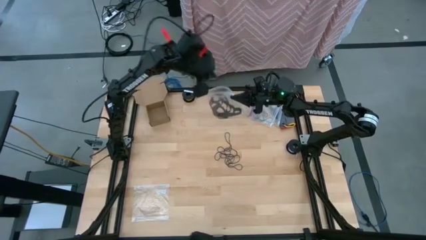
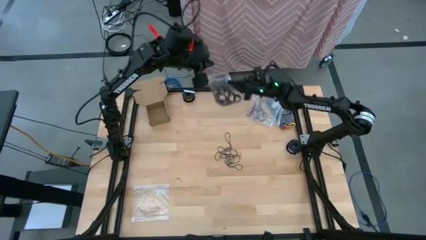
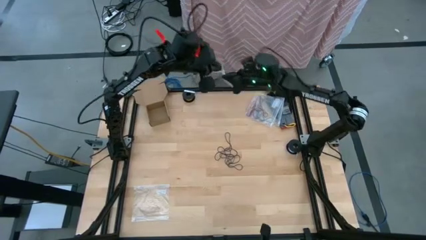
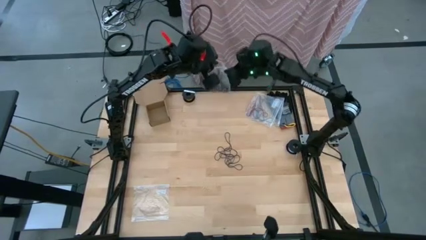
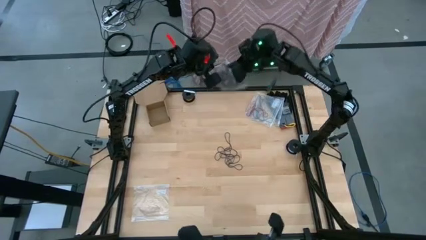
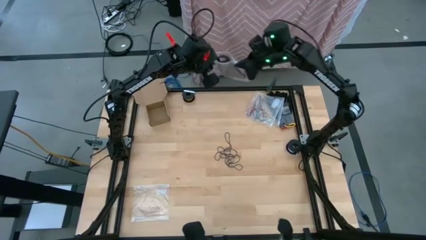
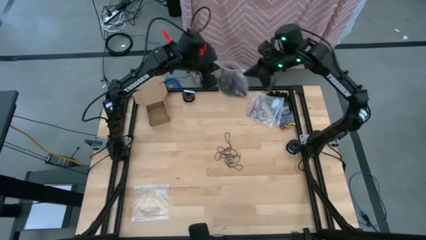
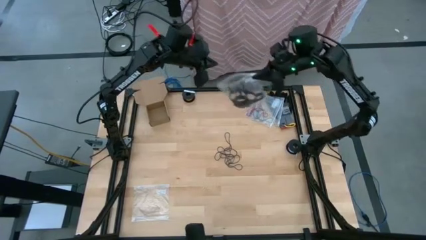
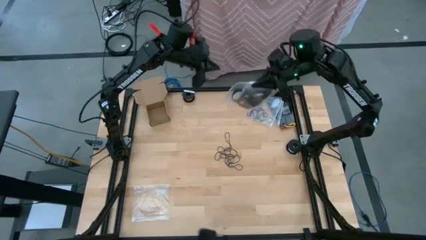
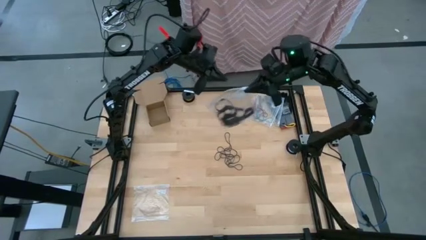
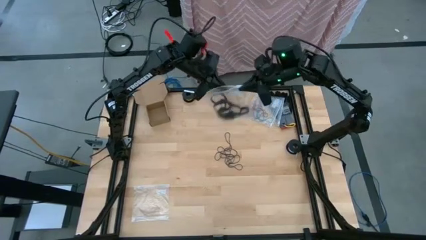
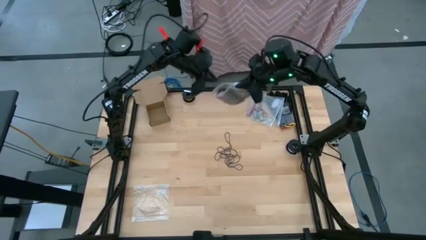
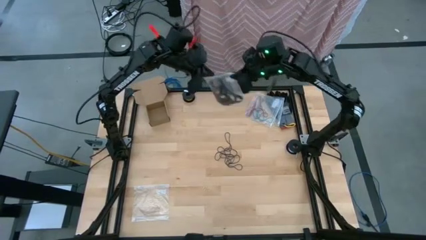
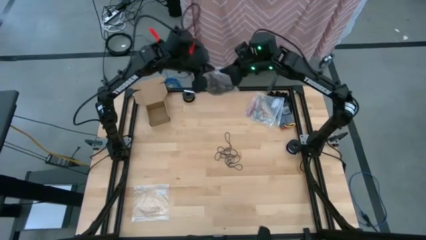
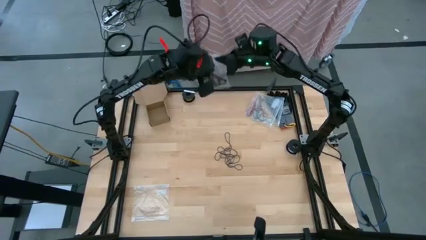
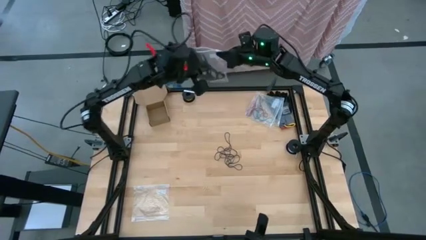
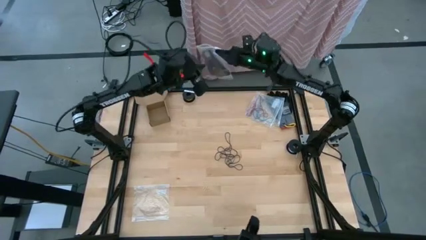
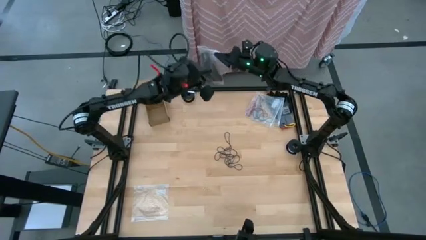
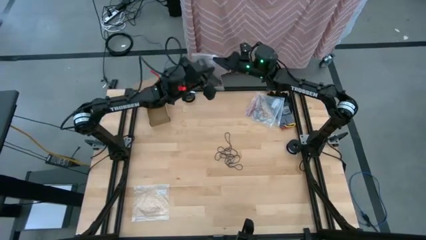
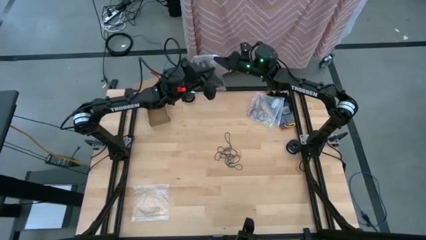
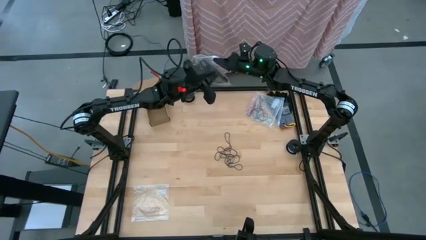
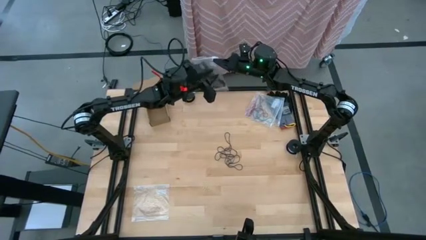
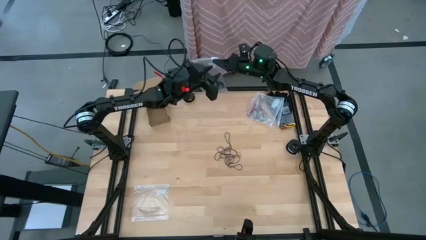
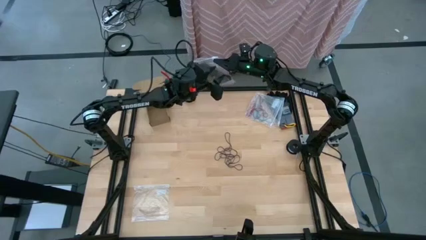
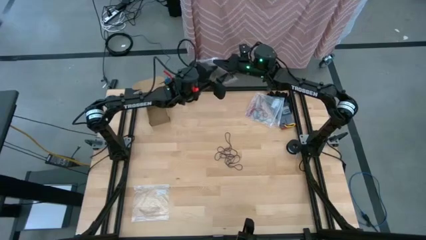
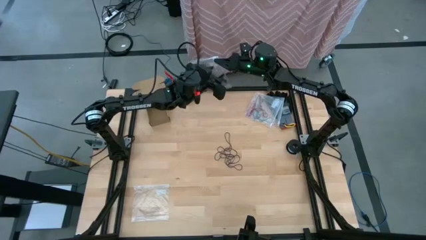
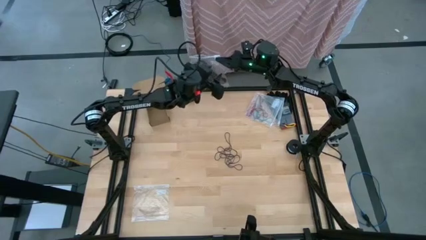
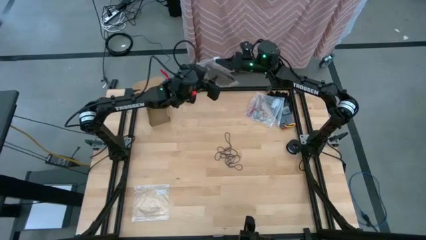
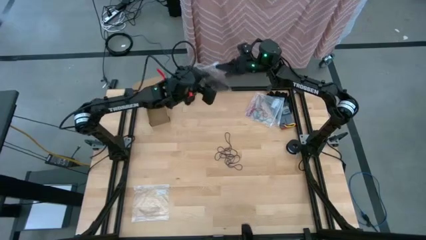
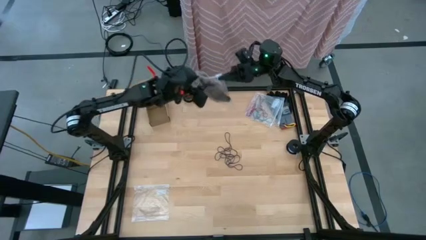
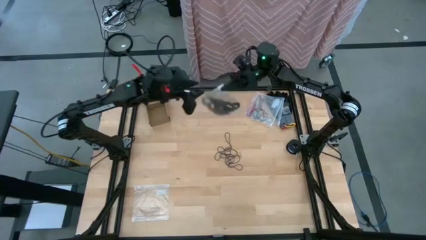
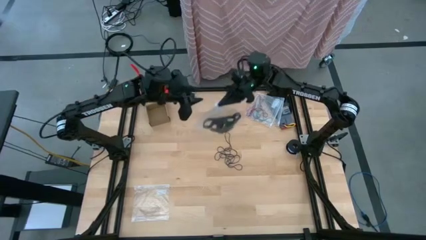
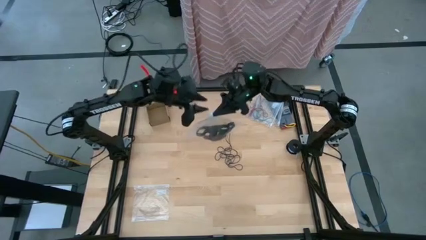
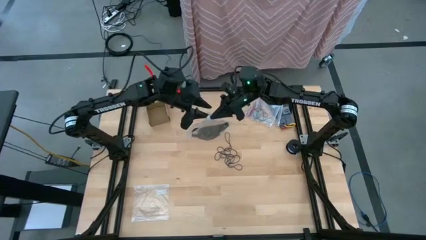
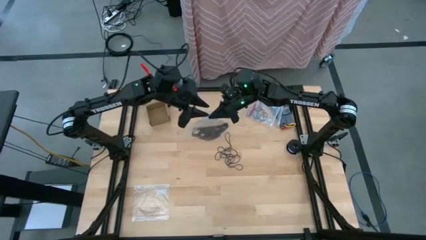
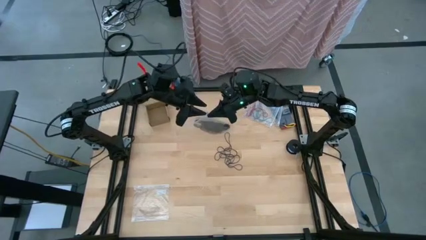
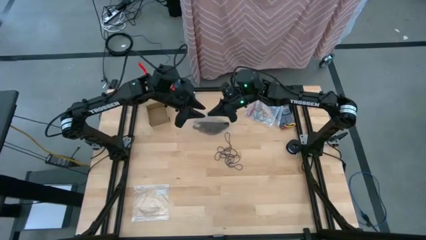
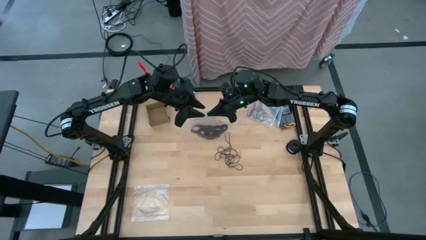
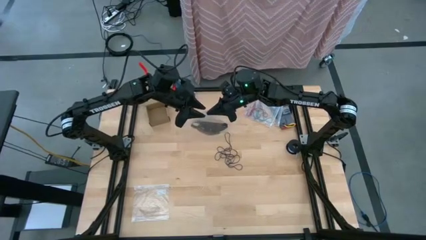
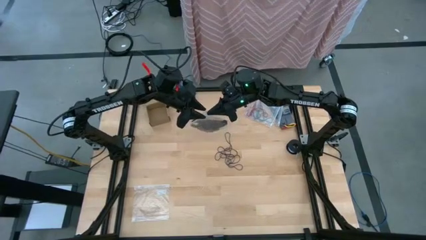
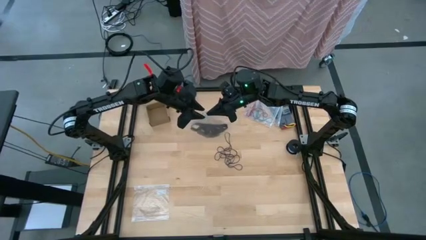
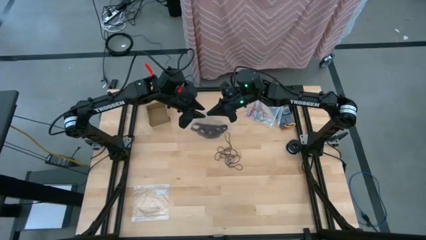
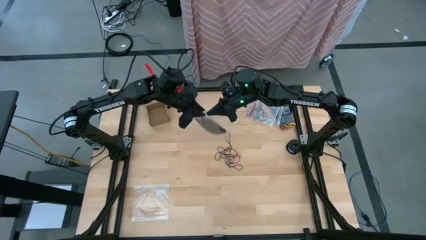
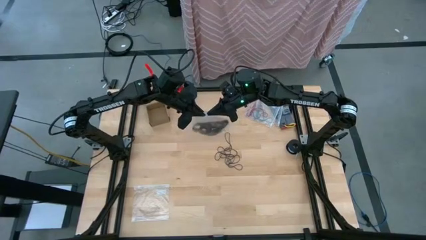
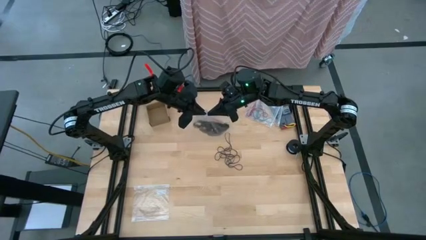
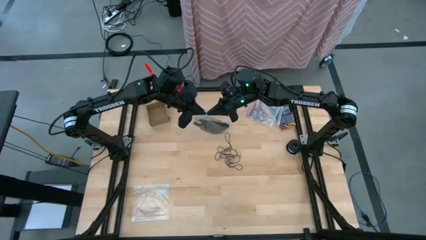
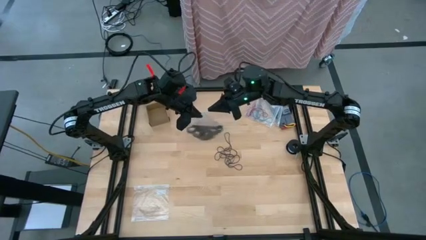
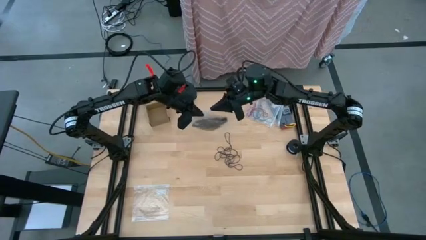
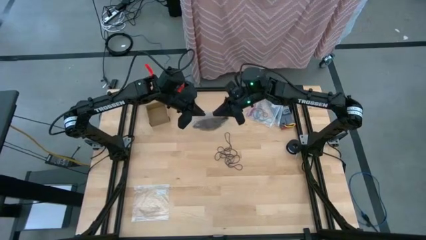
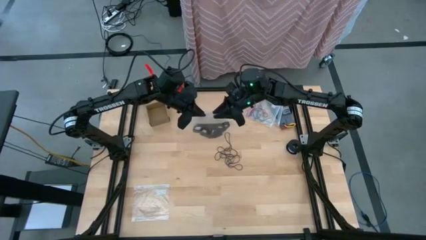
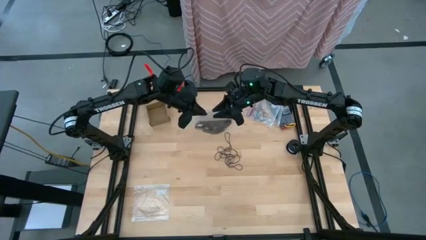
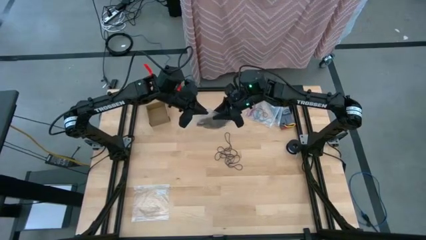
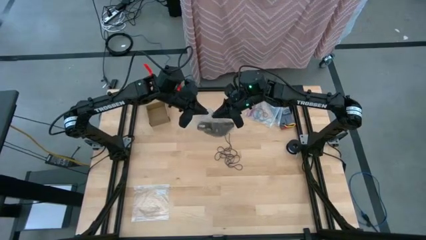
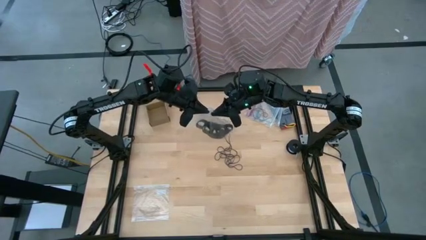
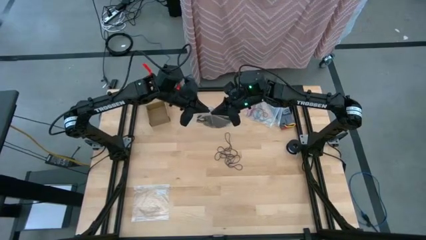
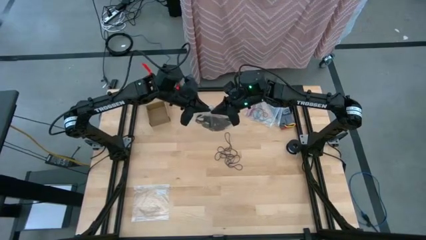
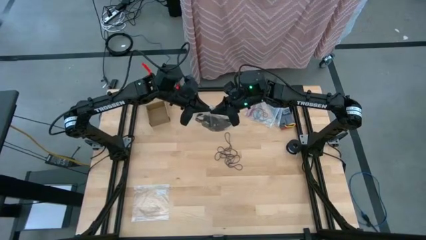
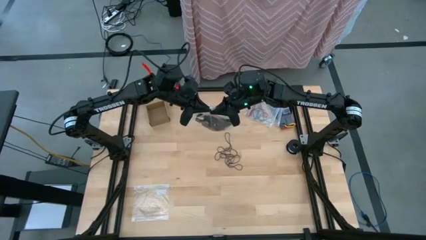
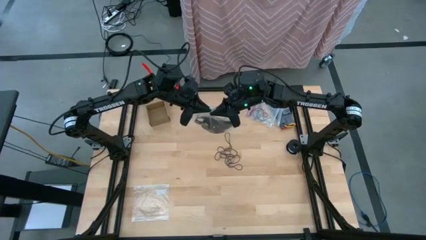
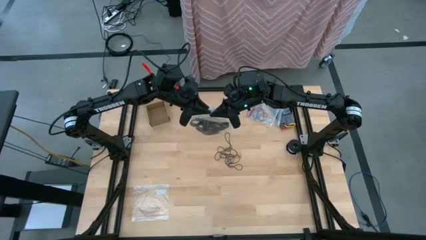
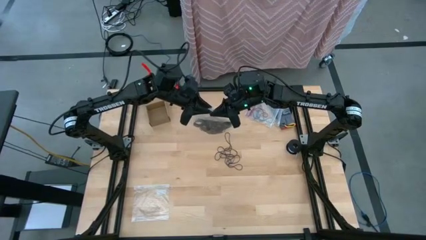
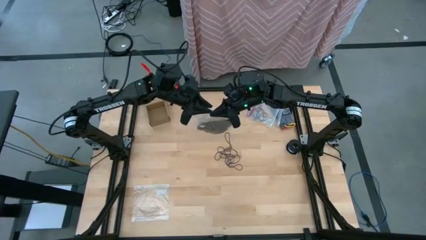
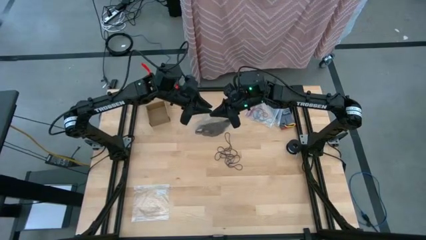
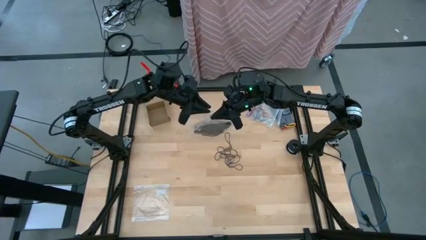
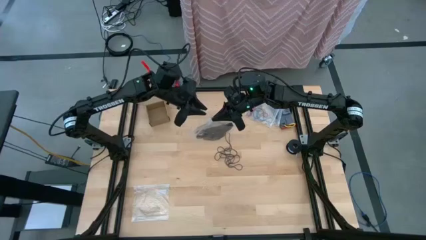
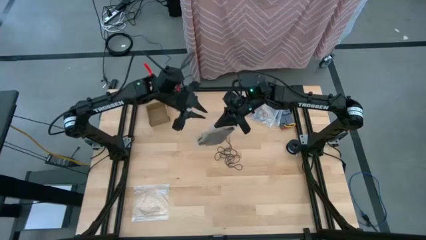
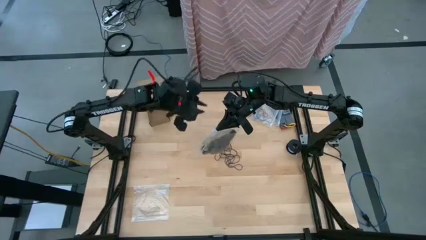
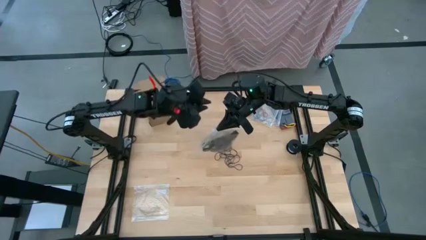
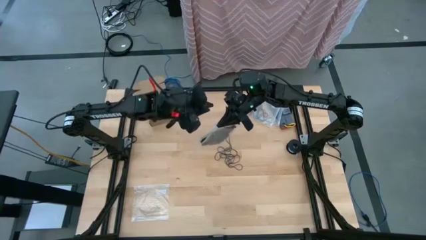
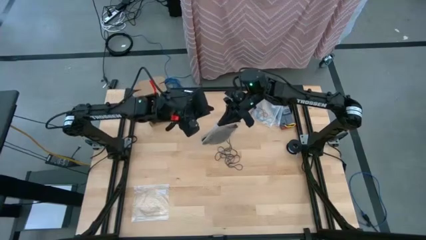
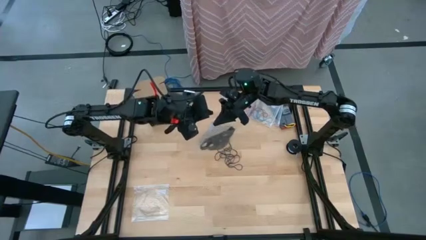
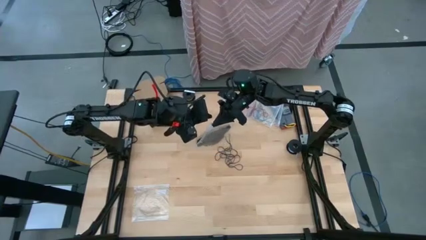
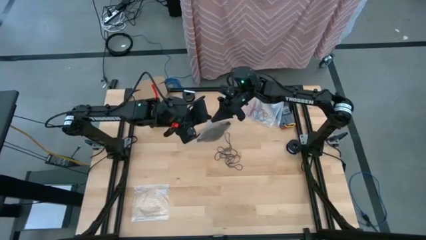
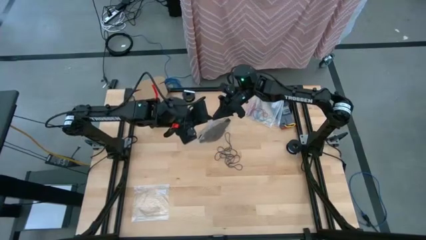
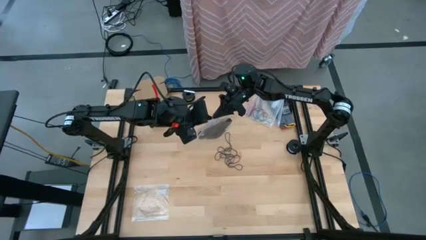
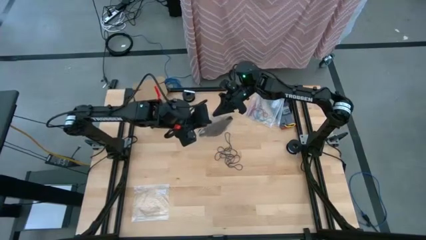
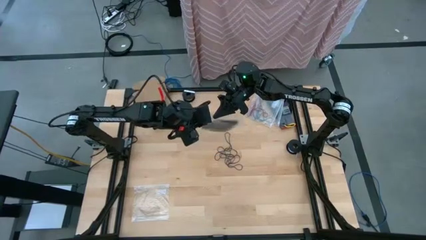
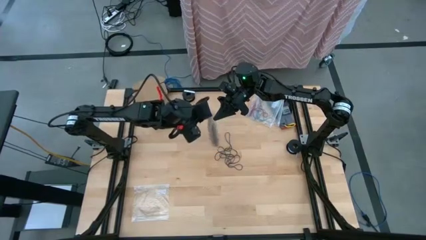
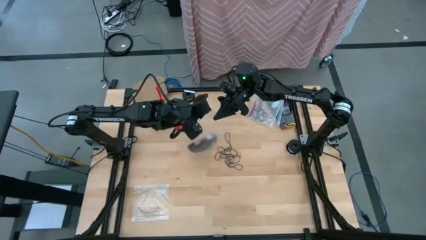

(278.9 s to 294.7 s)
Task: Sort rubber bands
Close the transparent zip bag

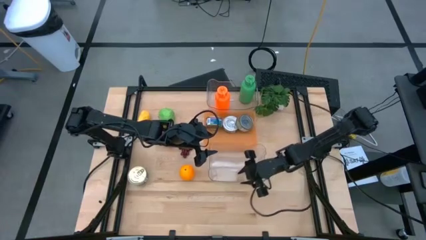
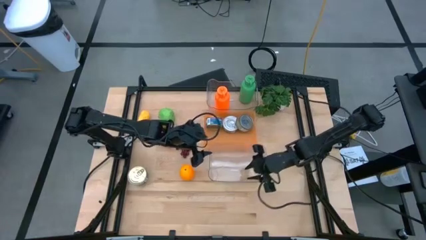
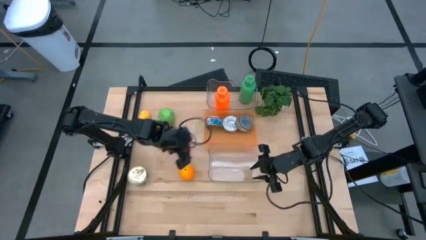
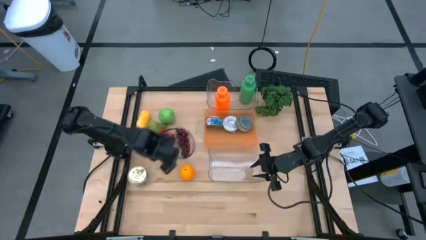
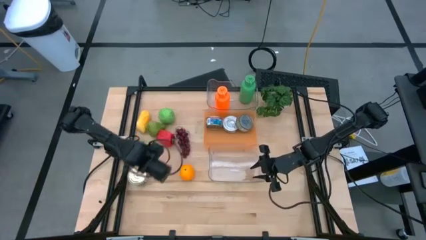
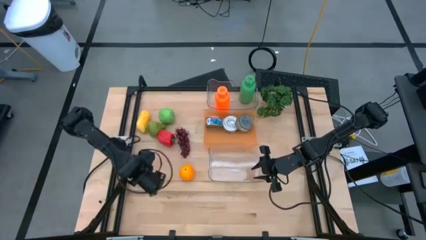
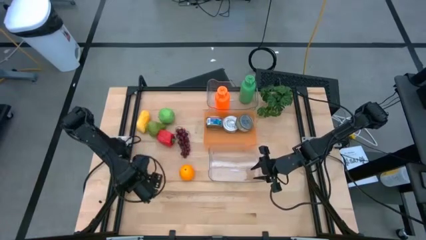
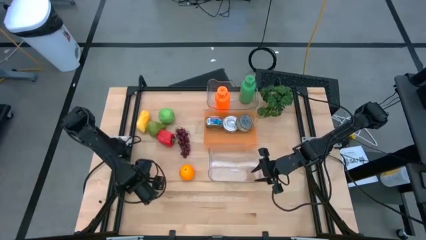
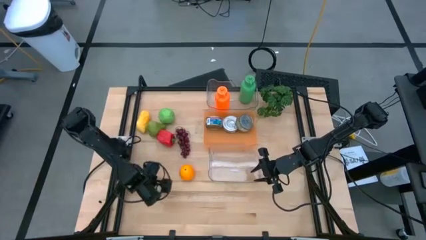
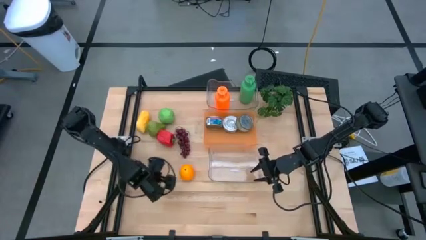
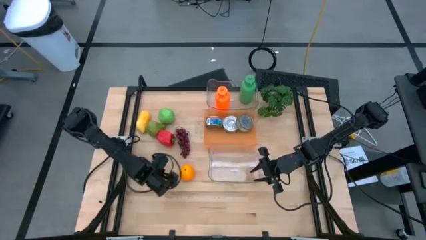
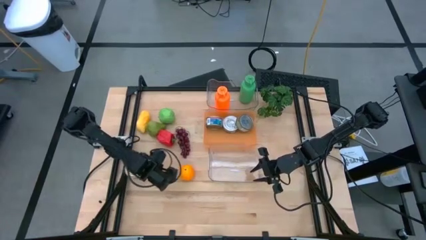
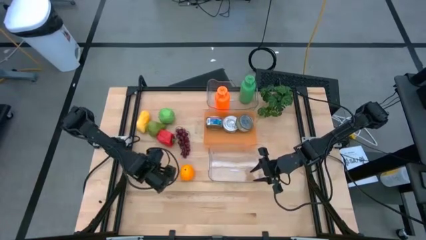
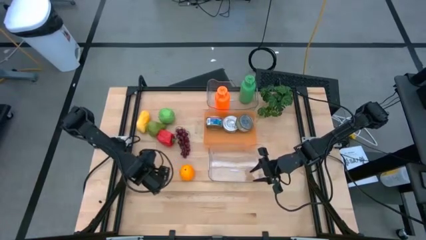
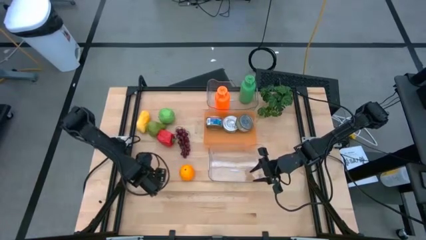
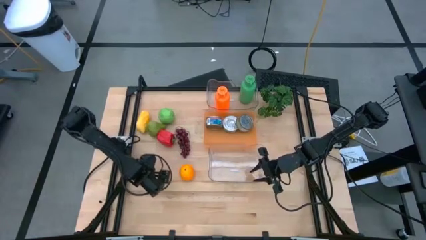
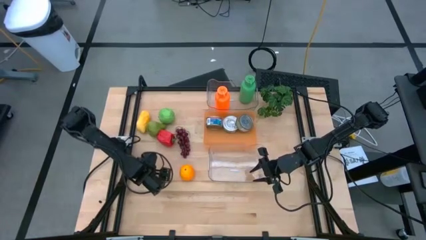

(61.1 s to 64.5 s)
Task: Pick & Place Food Item
Put the blue pink tuna can into the orange bin
